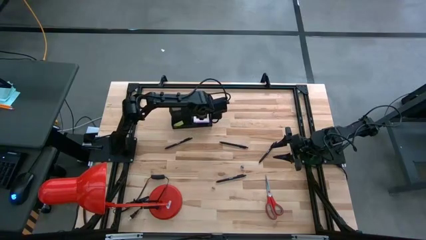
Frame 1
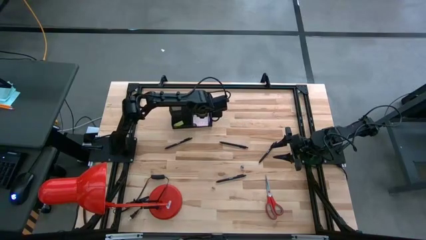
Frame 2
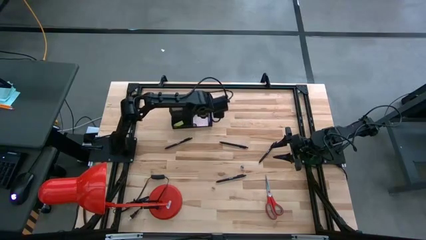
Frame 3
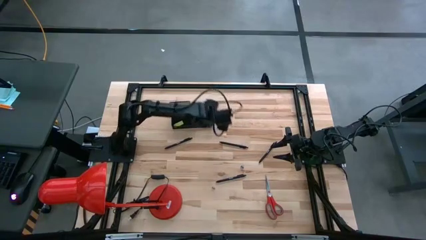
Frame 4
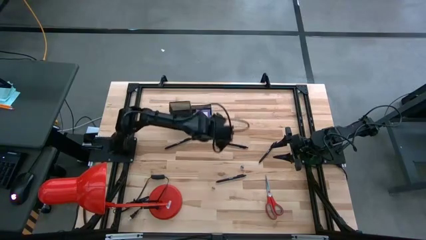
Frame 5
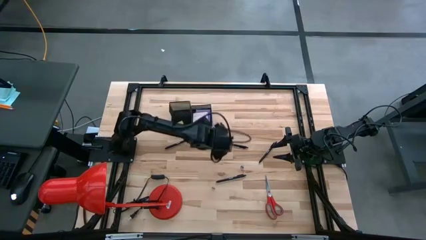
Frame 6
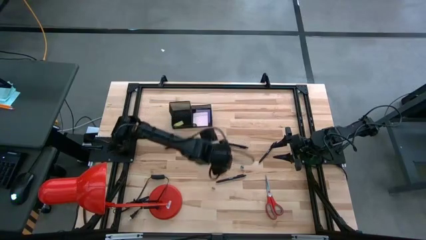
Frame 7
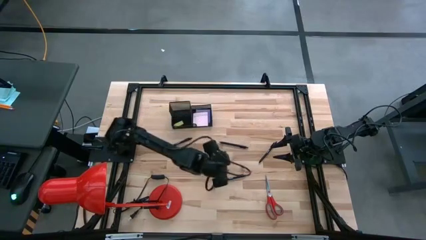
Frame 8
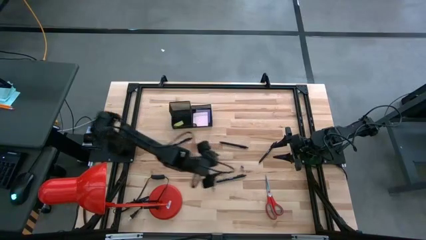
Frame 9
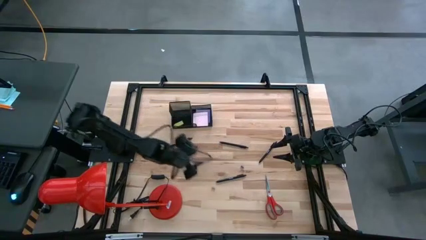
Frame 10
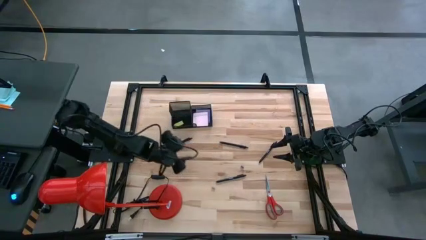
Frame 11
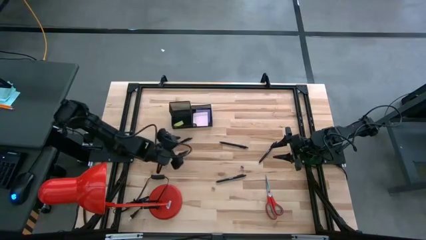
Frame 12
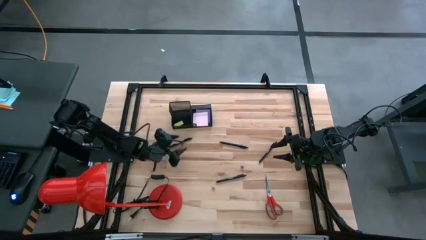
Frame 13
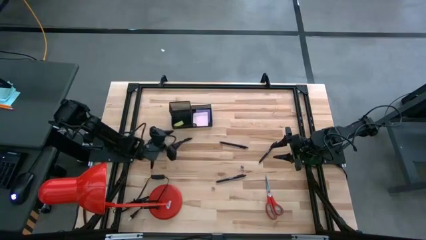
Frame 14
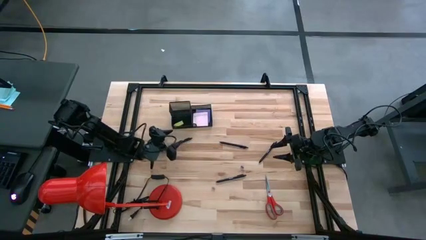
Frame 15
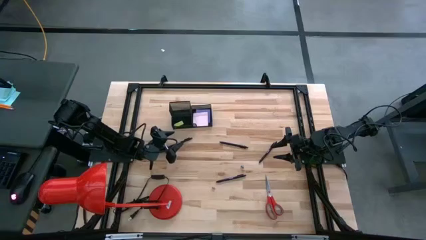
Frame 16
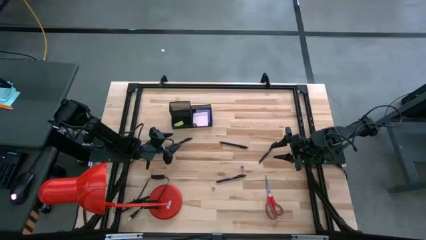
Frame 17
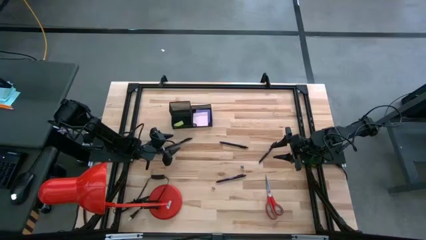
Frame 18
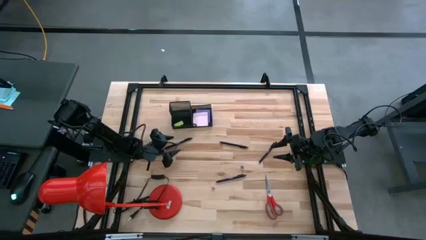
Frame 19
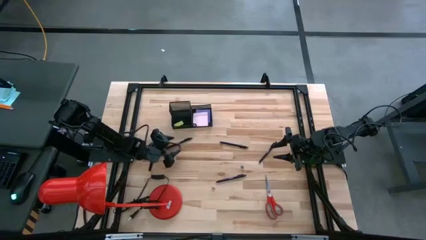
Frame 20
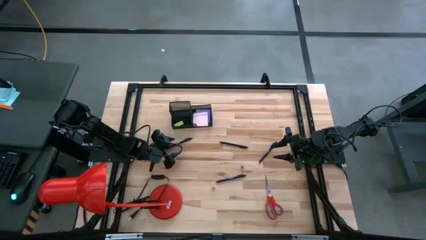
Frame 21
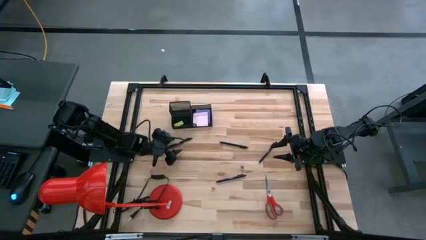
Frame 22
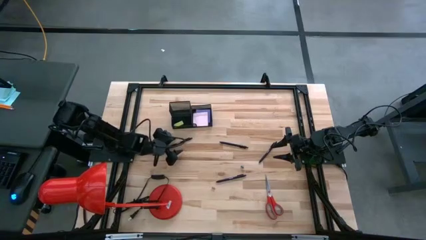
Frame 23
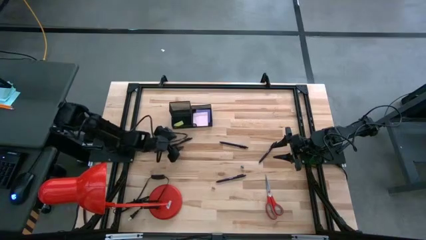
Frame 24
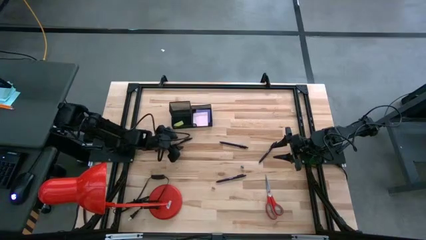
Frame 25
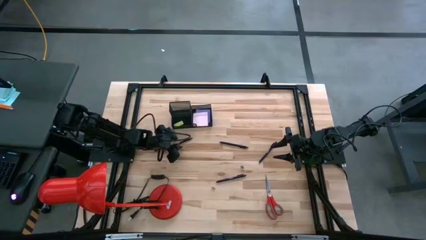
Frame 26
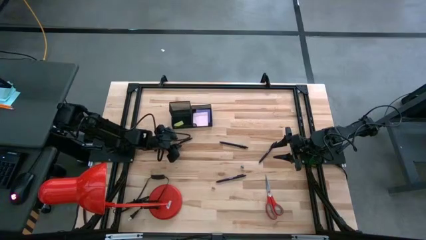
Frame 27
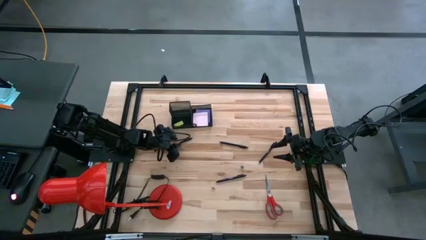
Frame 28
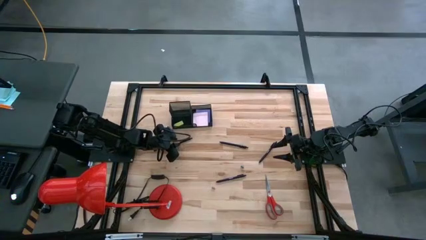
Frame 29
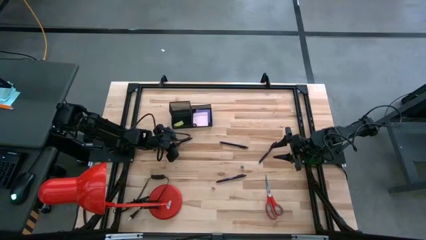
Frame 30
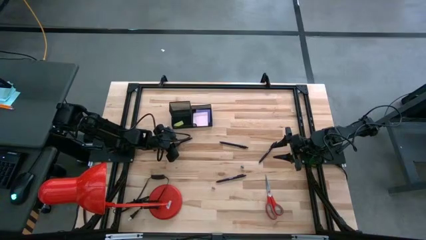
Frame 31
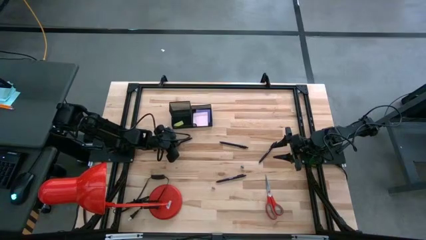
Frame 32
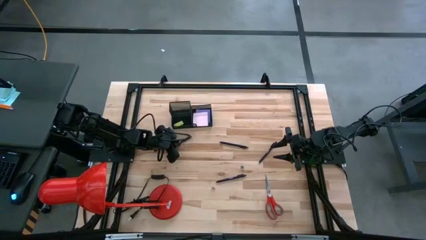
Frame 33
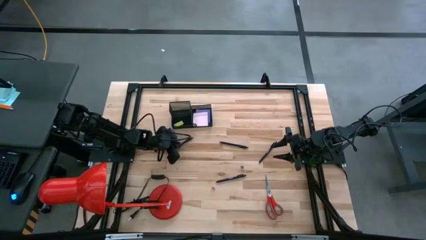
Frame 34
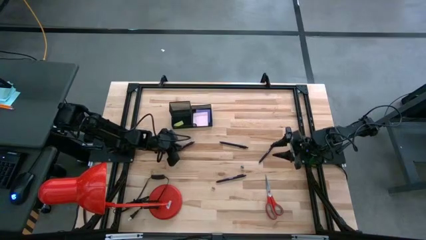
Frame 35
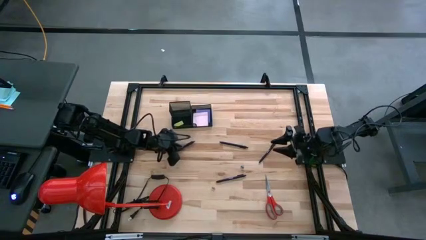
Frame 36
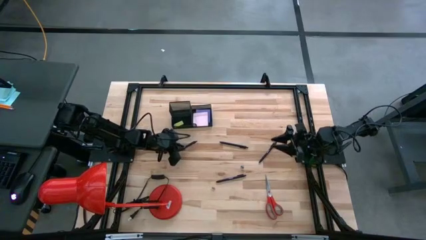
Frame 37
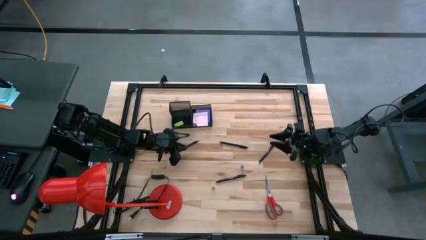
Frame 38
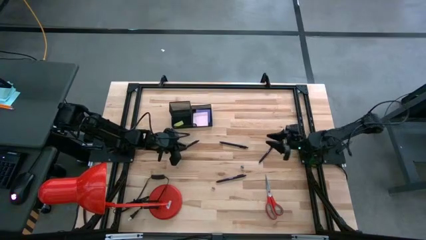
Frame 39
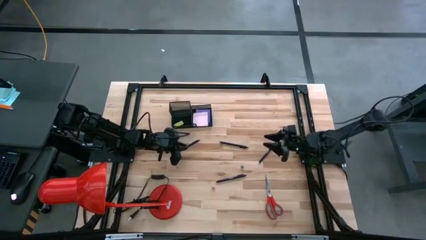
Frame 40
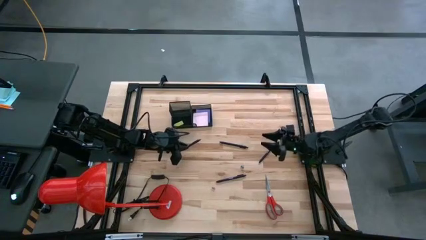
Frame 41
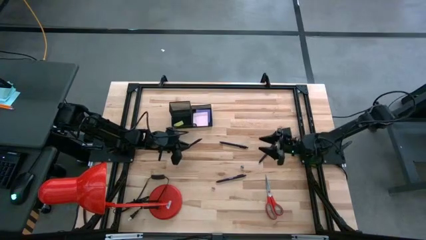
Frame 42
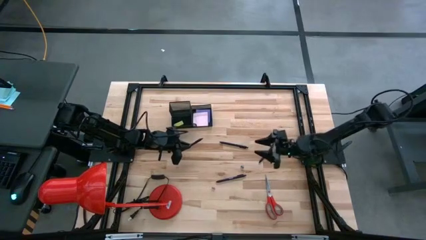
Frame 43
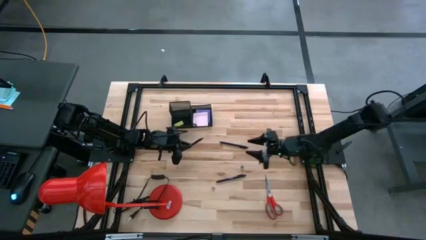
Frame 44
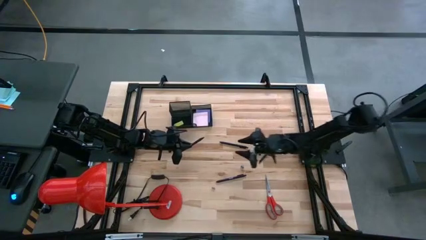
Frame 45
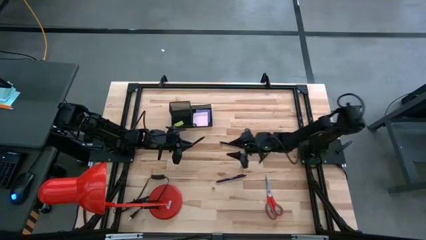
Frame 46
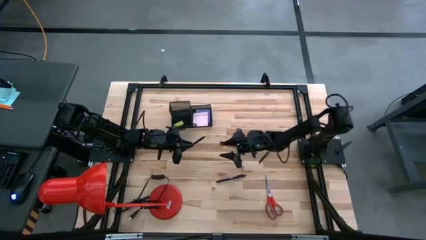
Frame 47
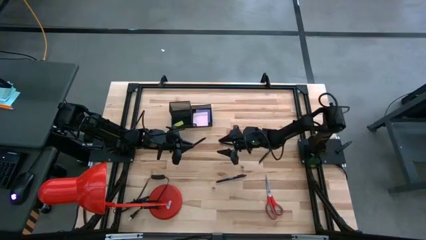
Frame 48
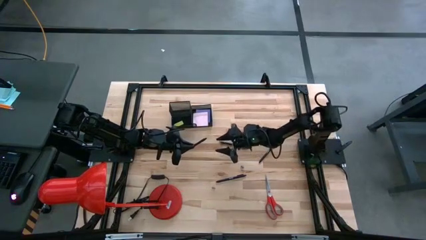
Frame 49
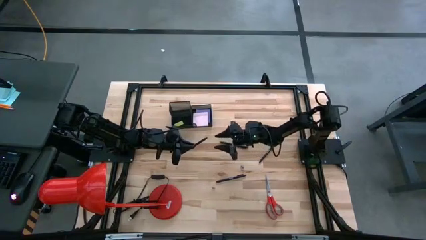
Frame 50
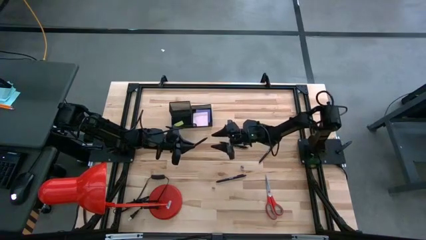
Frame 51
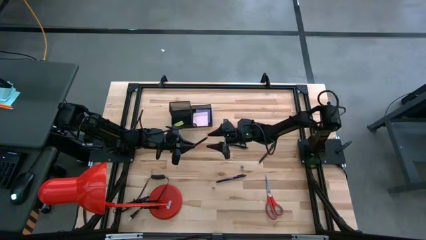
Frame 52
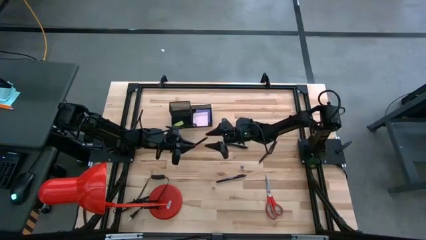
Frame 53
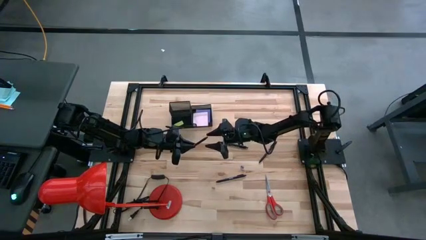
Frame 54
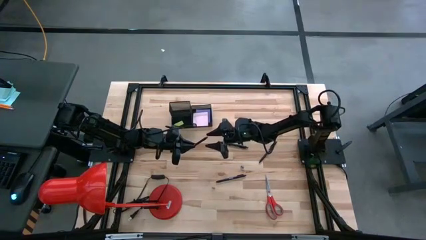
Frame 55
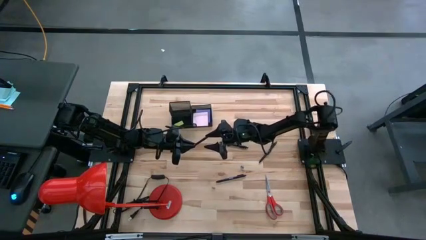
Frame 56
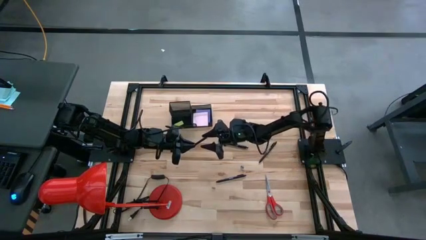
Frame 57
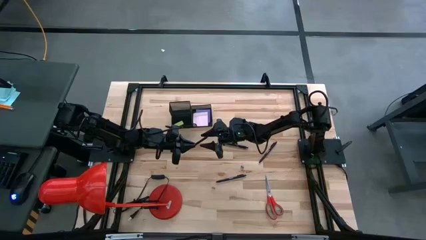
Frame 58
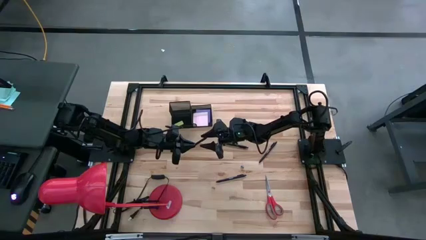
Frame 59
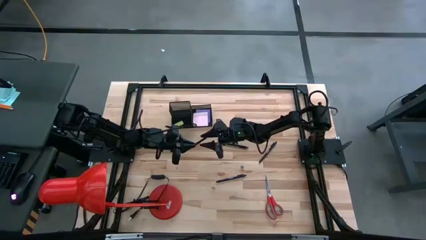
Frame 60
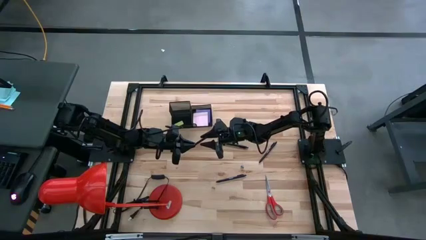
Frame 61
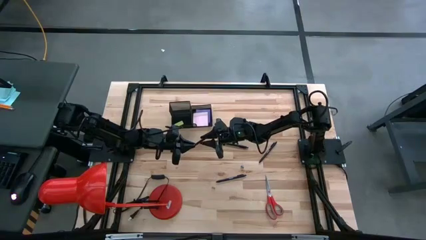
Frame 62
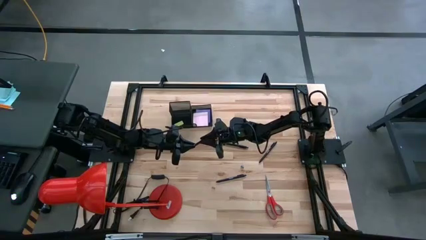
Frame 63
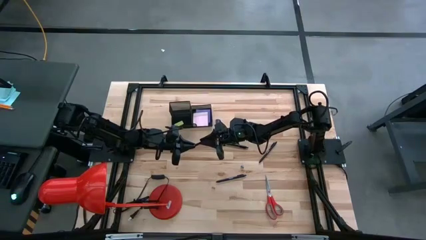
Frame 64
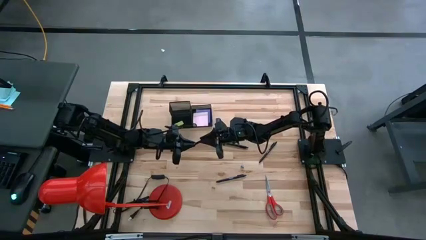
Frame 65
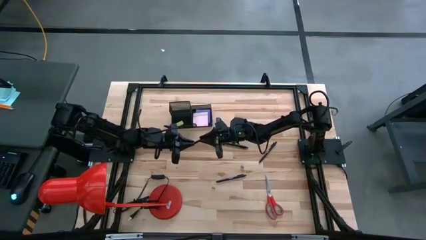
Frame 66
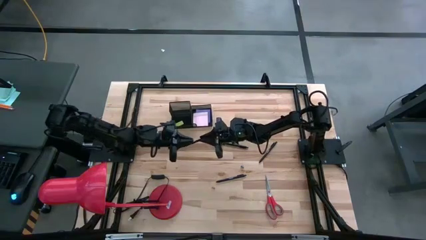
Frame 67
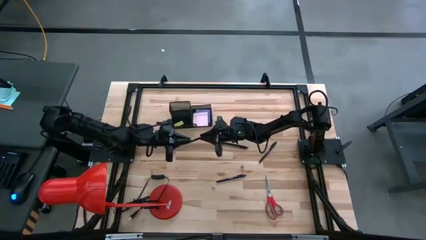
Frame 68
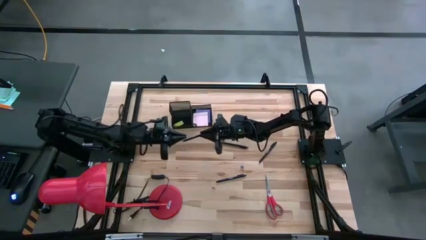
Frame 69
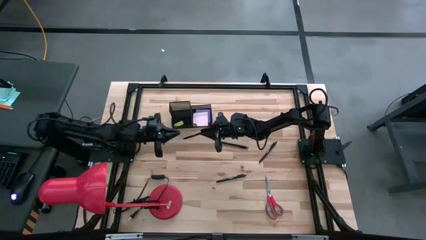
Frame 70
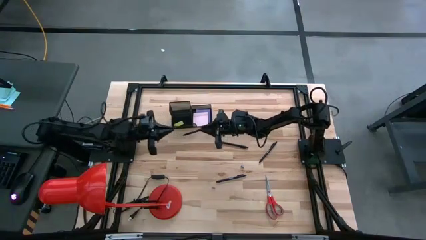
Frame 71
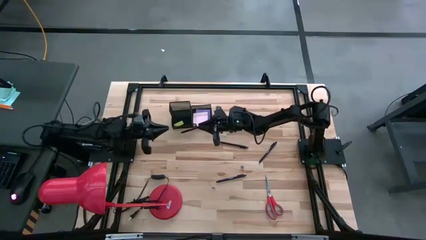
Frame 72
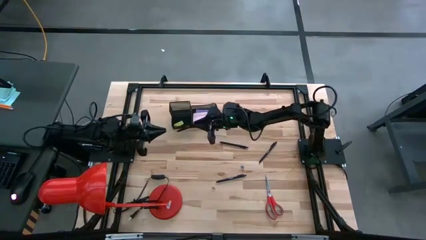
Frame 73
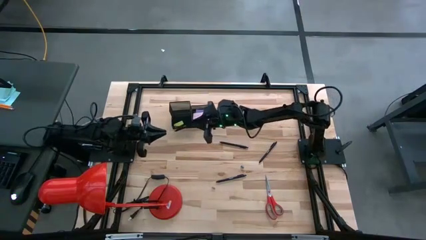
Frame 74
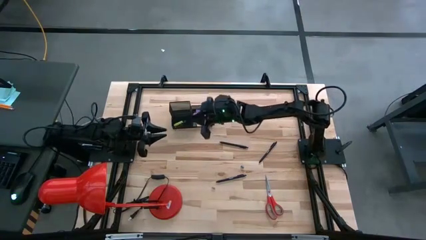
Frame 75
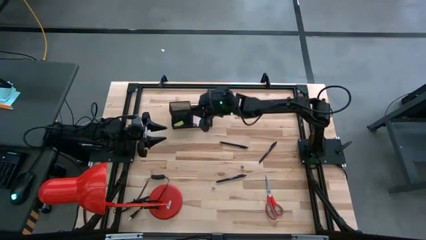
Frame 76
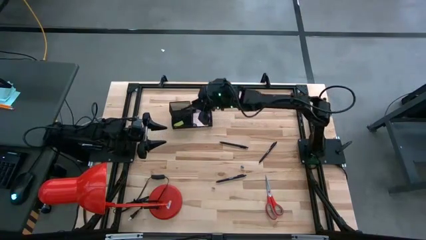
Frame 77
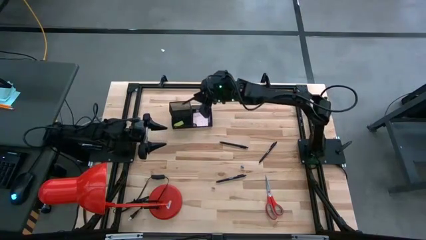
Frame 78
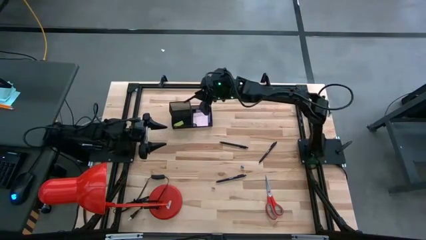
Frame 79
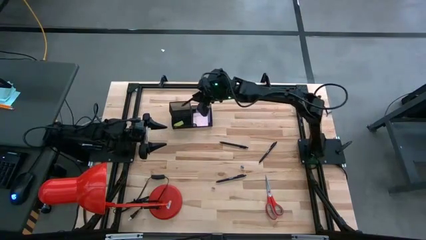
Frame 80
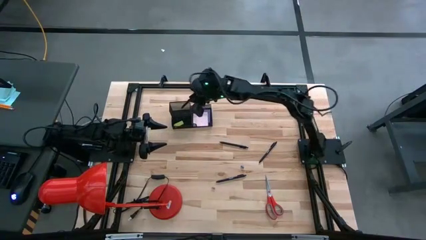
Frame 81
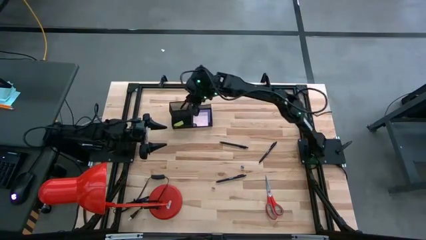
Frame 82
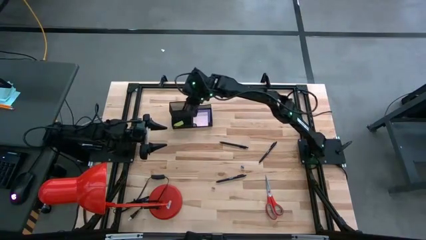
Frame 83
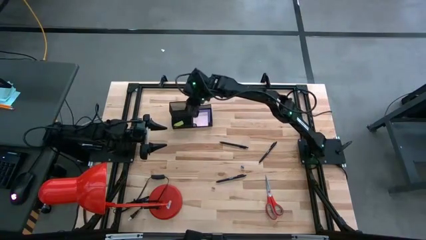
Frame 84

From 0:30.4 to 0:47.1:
Task: Pick and place office supplies into organizer
Put the black pen into the desk organizer
